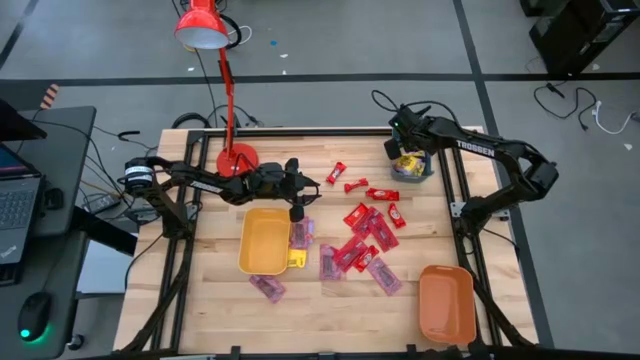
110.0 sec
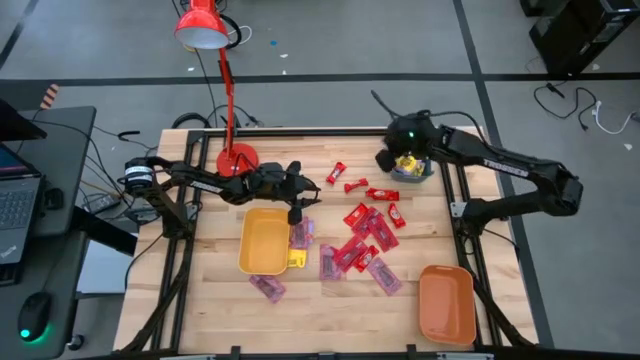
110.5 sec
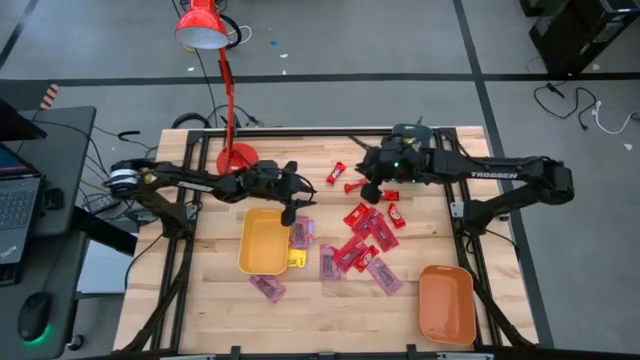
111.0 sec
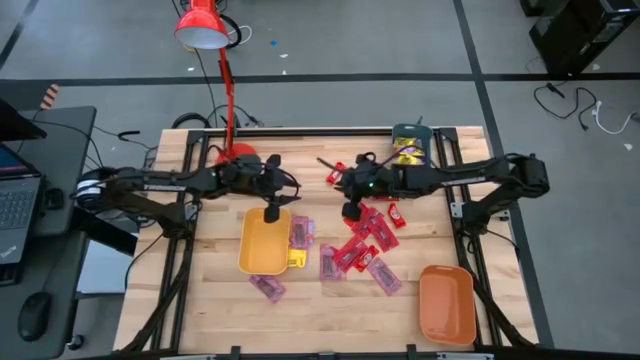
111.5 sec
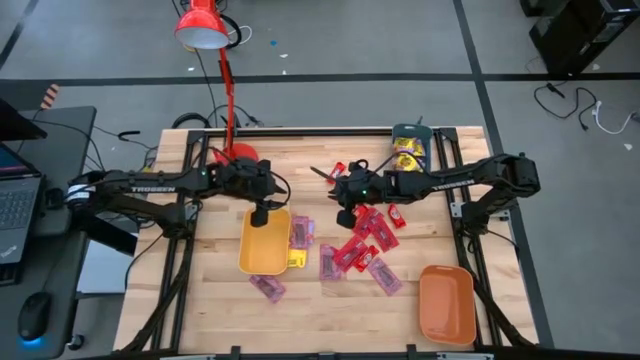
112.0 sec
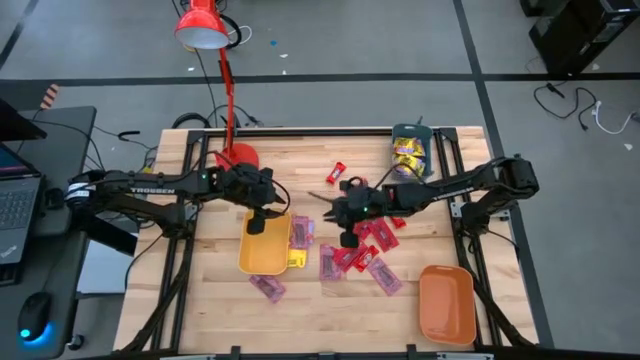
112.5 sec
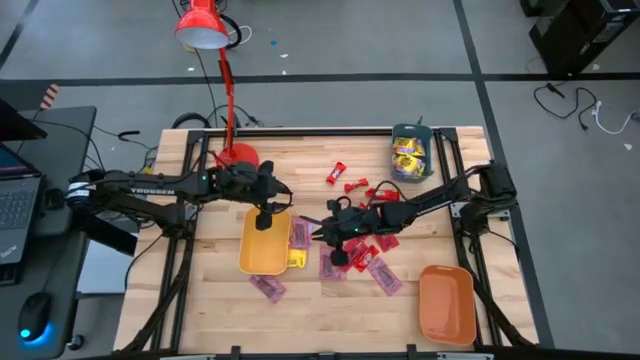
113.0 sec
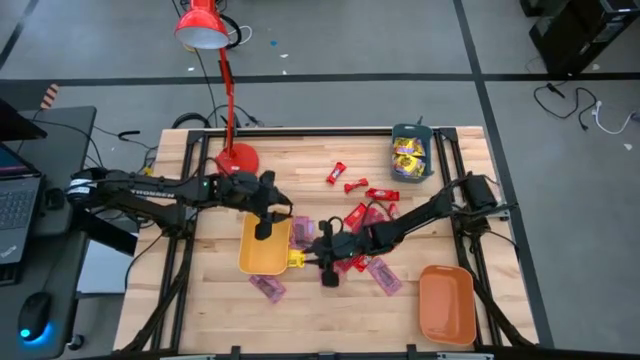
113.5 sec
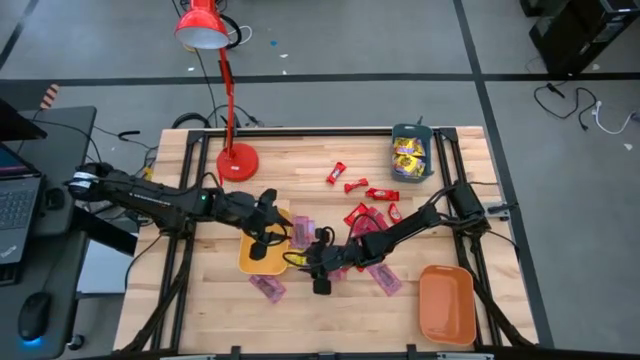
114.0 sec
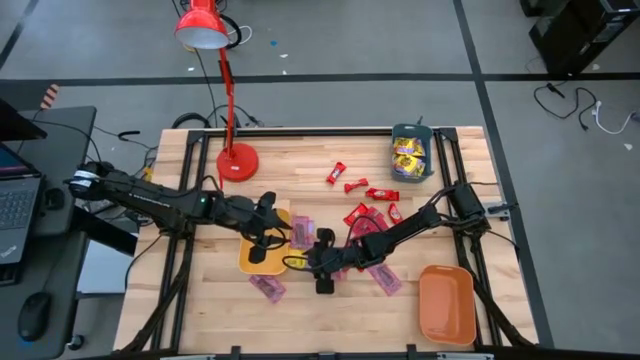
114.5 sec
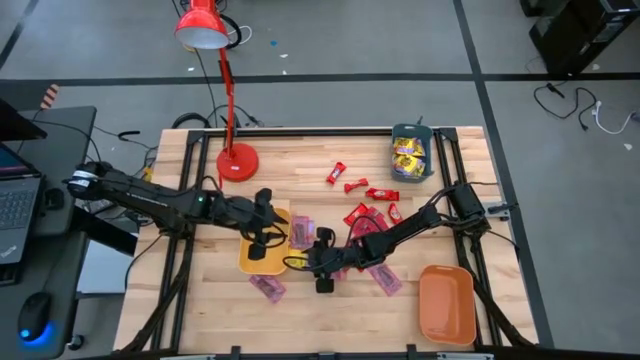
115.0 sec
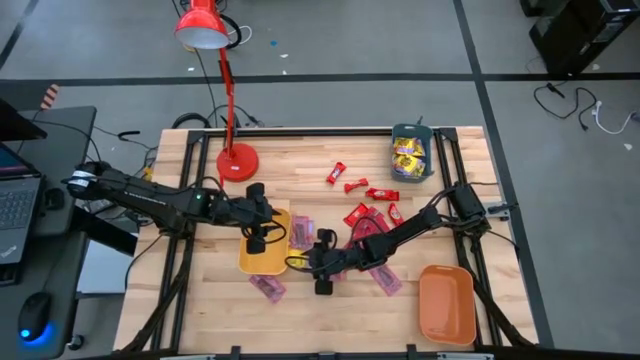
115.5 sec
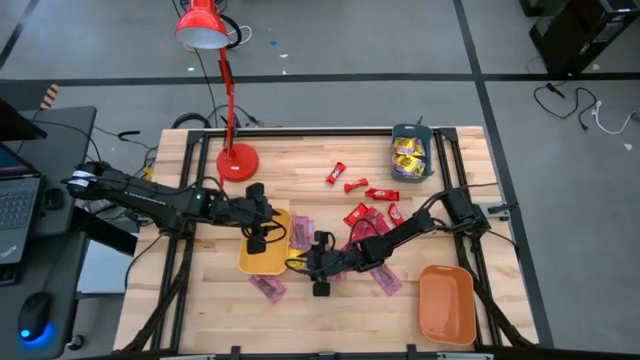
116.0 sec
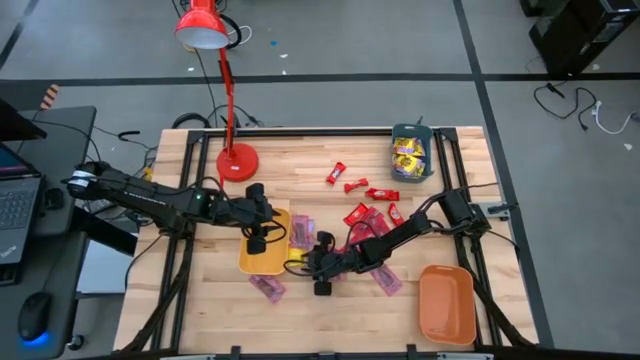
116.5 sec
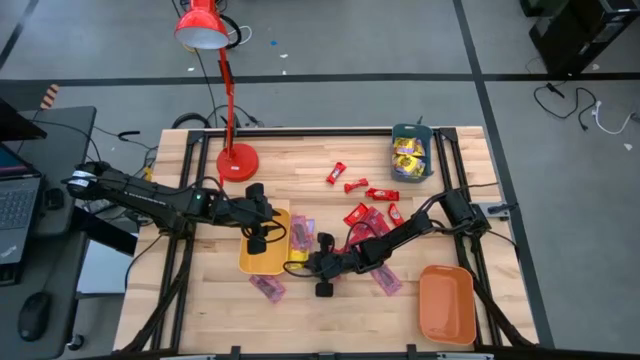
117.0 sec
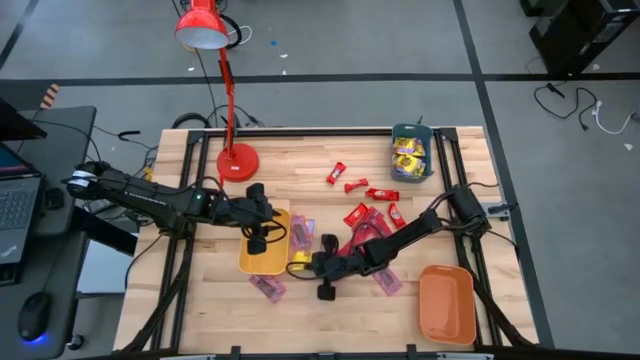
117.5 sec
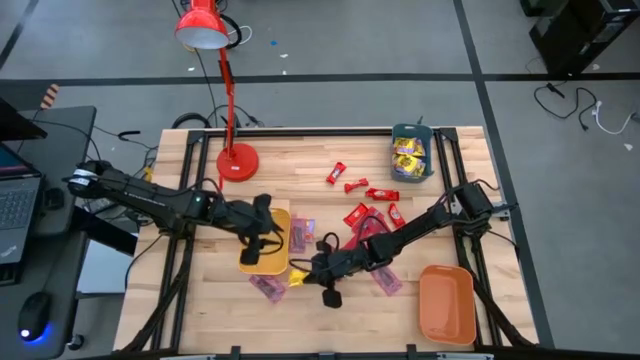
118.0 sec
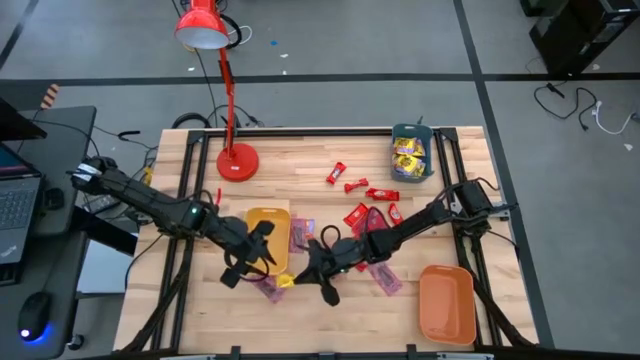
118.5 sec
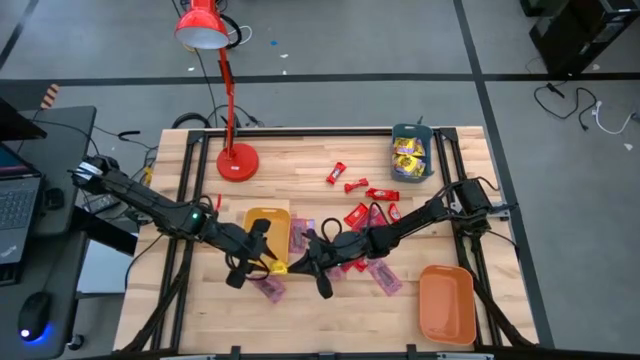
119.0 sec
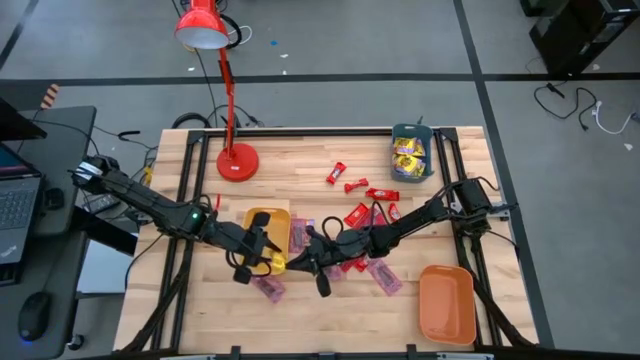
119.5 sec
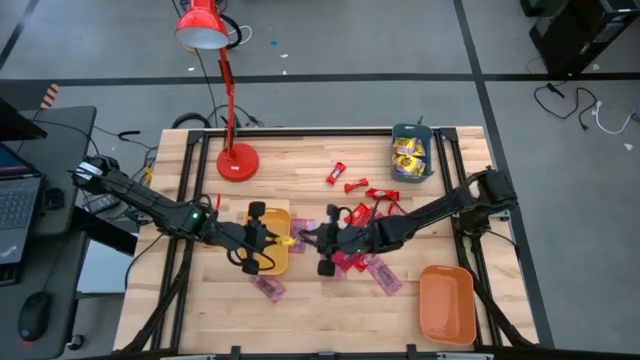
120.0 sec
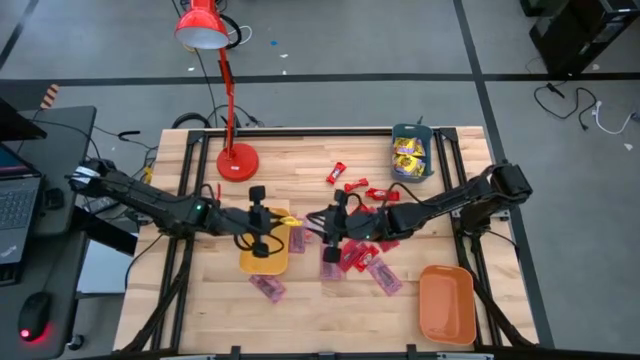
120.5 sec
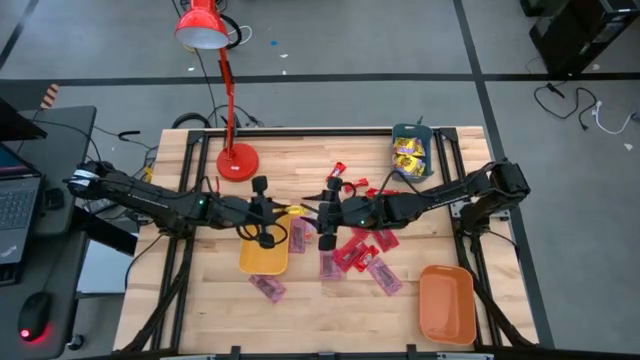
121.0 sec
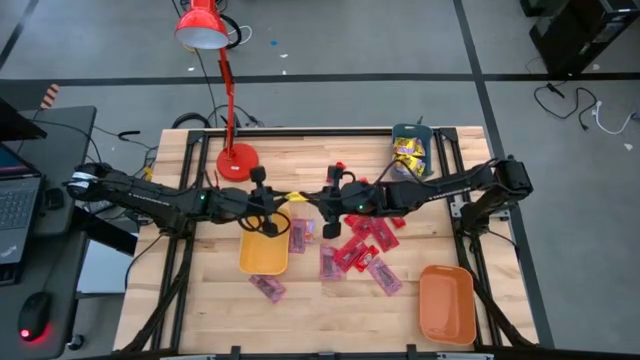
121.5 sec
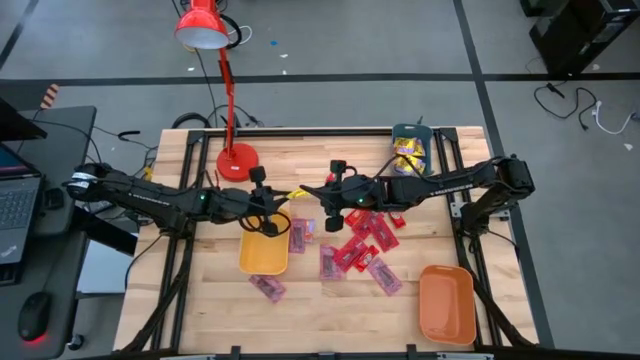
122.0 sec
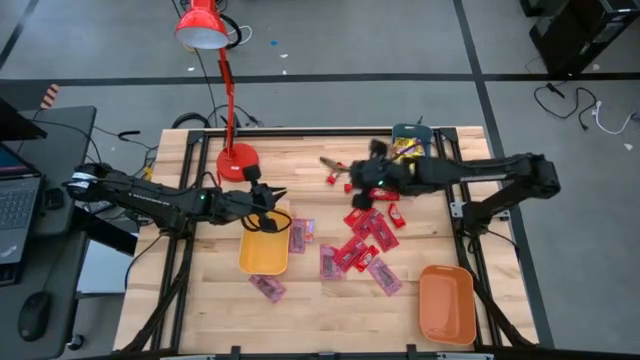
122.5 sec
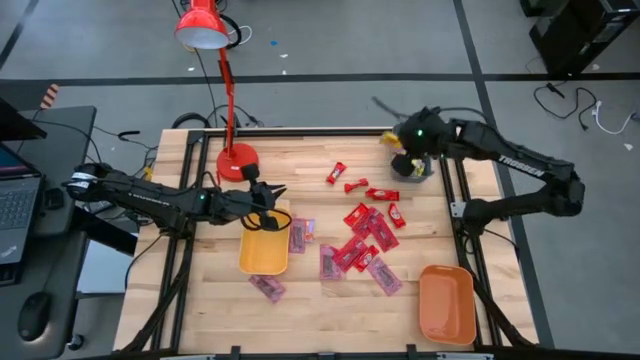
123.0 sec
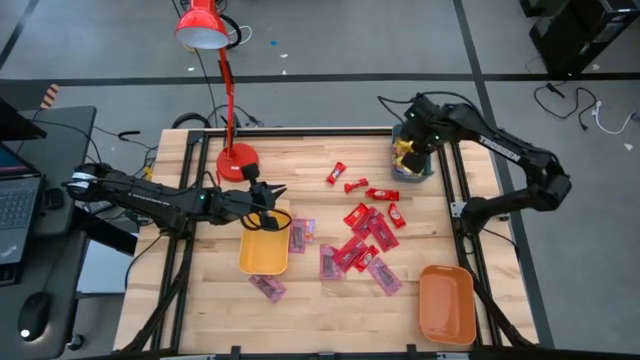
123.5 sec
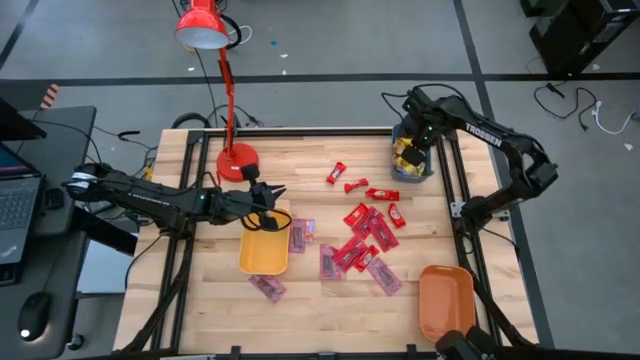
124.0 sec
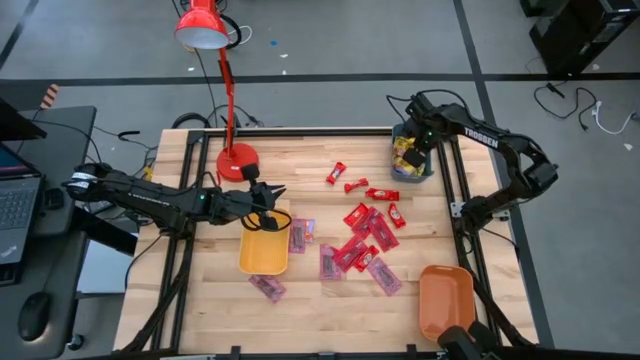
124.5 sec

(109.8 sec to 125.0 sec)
Task: Sort candy
Put the yellow candy pack into the blue bin

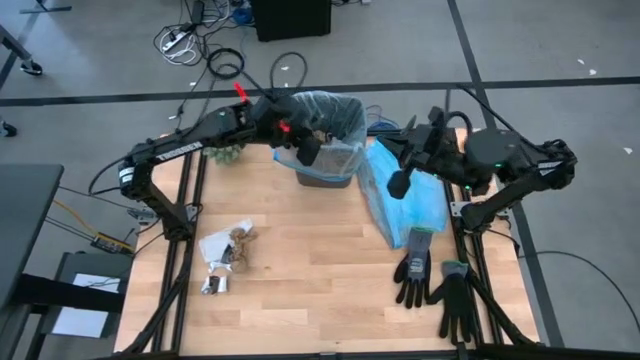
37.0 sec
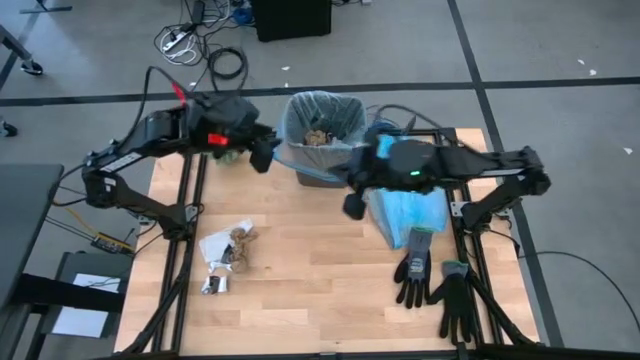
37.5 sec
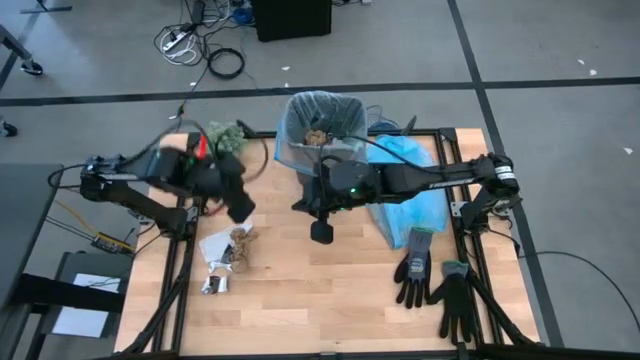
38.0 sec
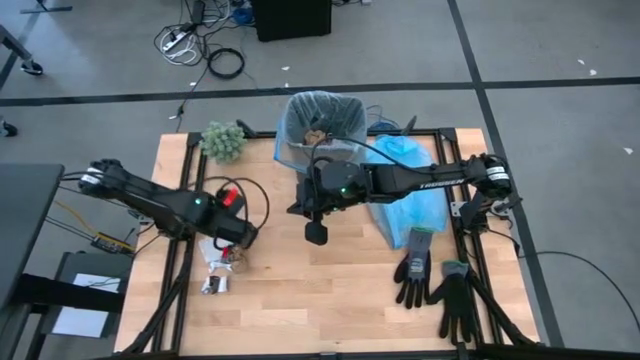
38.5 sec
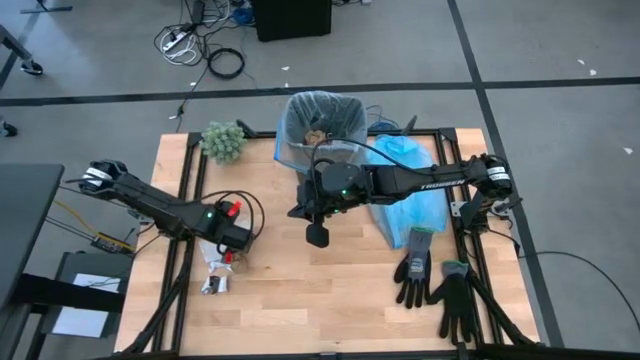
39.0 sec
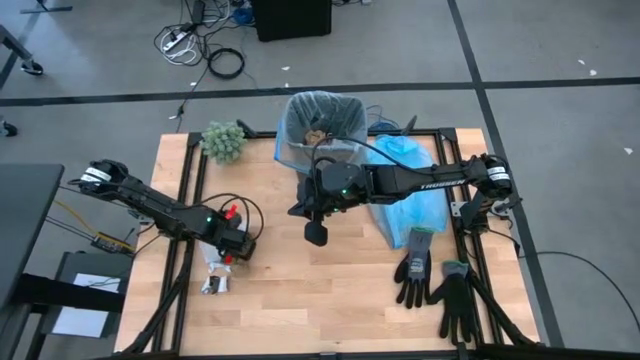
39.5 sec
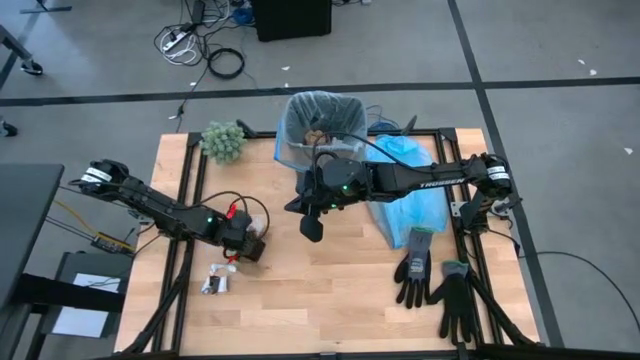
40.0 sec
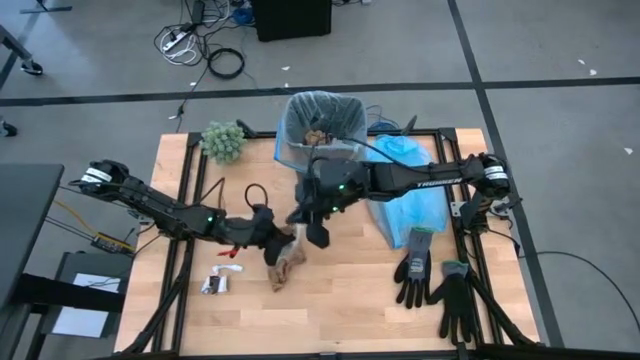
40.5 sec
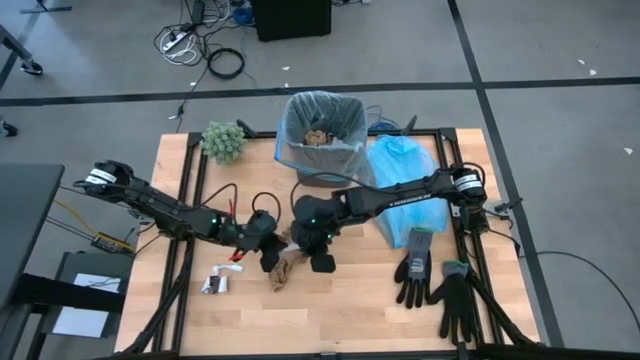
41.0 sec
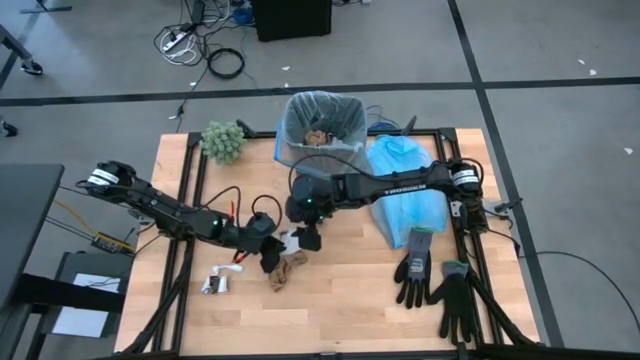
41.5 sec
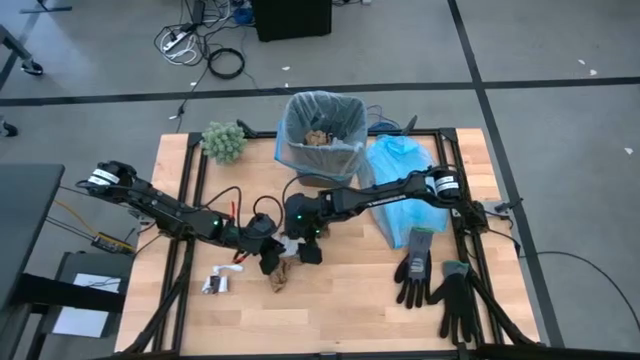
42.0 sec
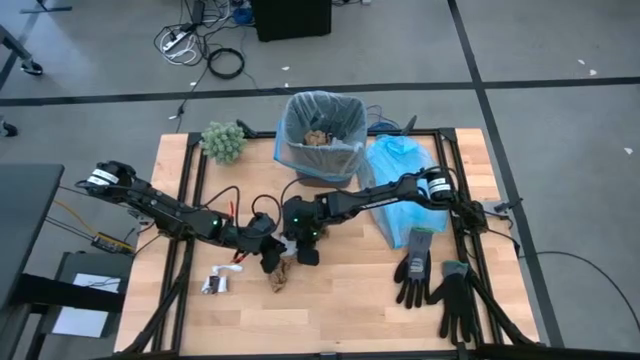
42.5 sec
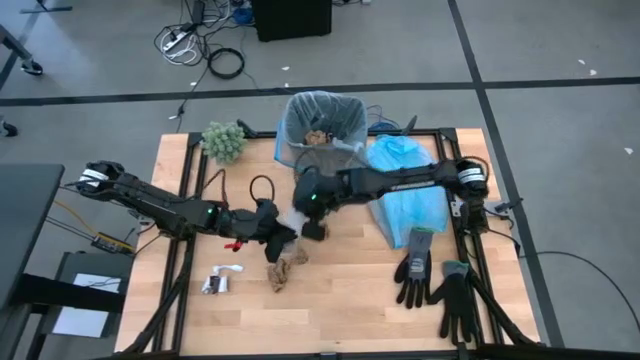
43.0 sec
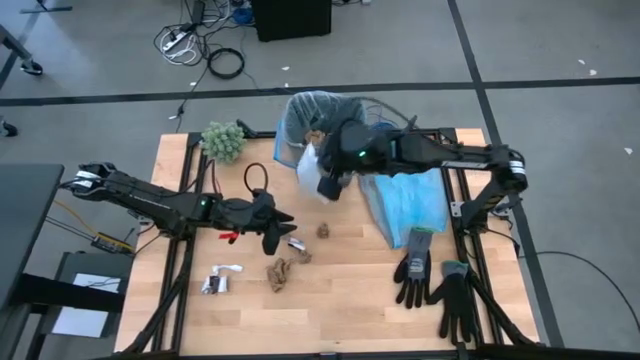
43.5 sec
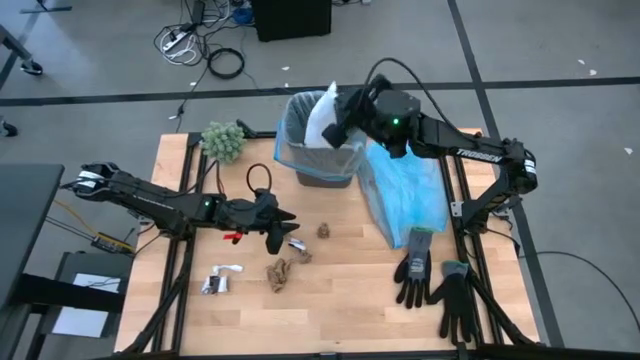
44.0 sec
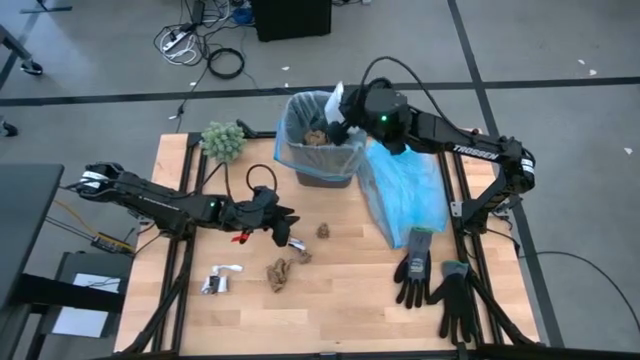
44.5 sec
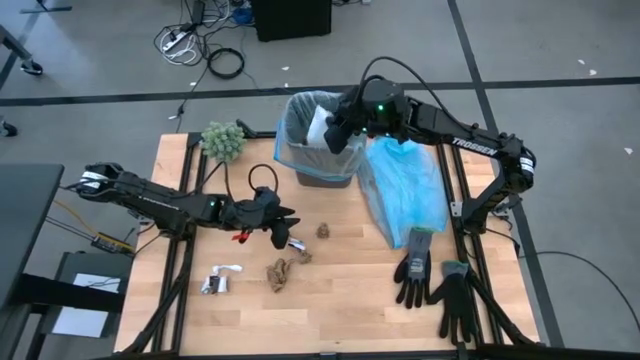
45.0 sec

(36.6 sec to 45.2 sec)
Task: place trash/remove bag and relplace
Put the white napkin into the trash bin
